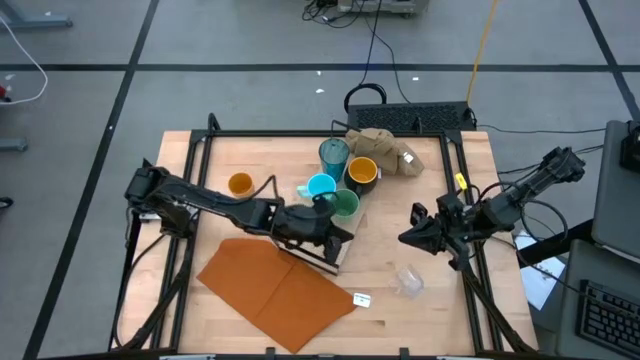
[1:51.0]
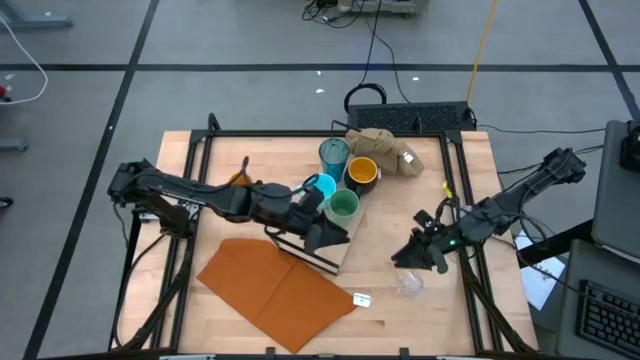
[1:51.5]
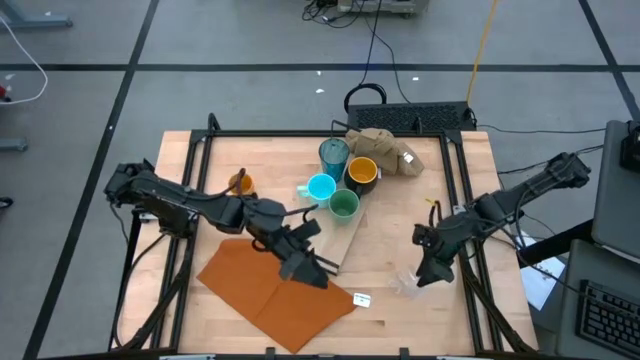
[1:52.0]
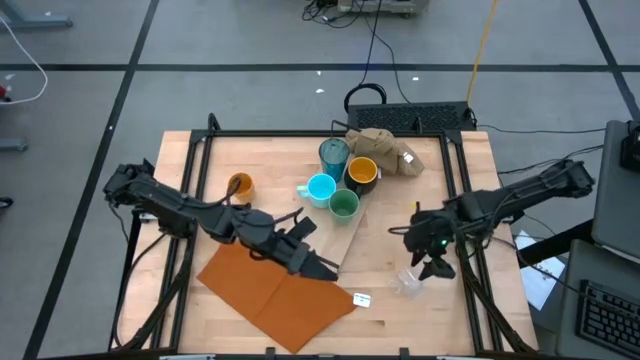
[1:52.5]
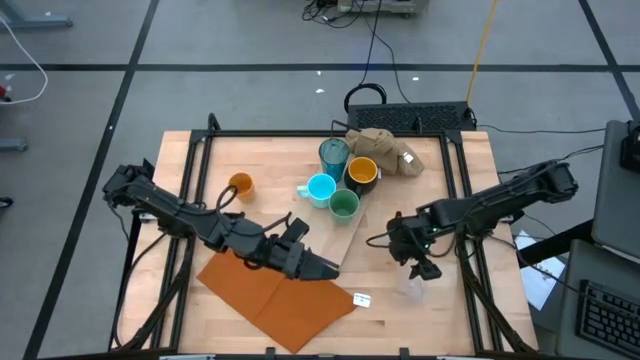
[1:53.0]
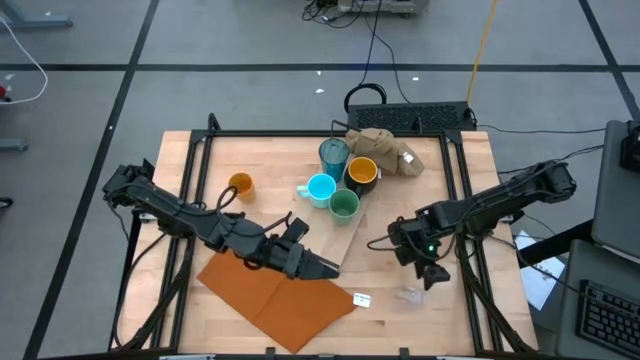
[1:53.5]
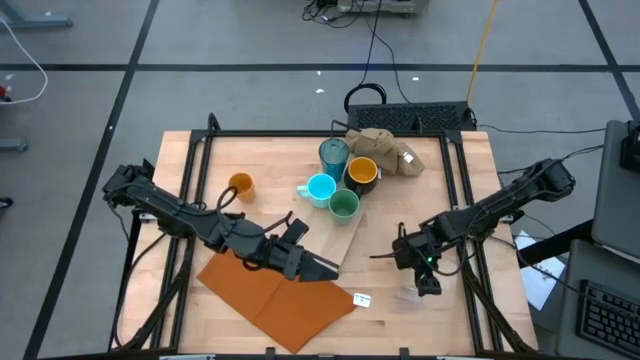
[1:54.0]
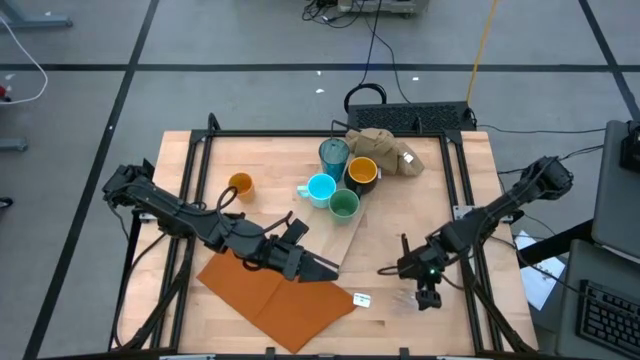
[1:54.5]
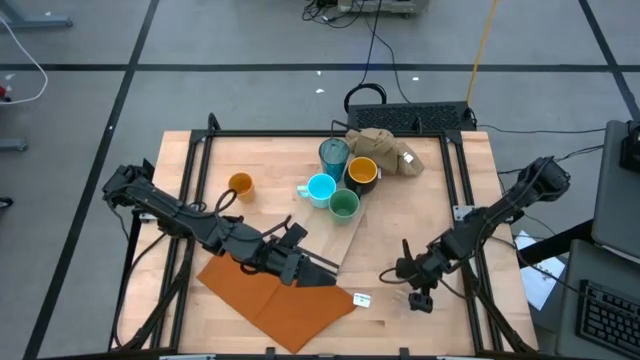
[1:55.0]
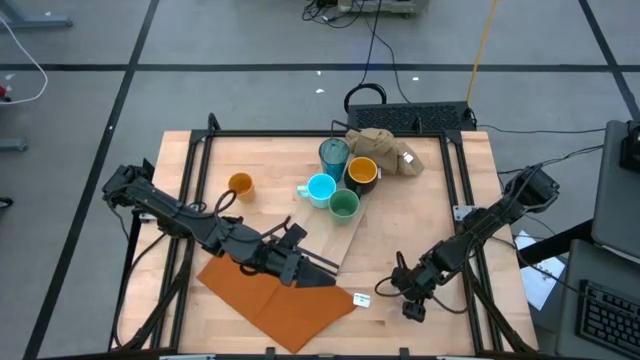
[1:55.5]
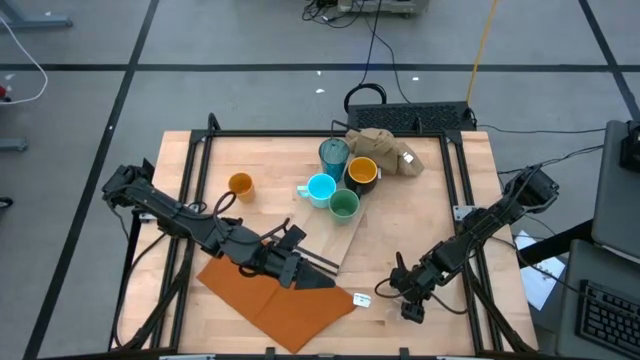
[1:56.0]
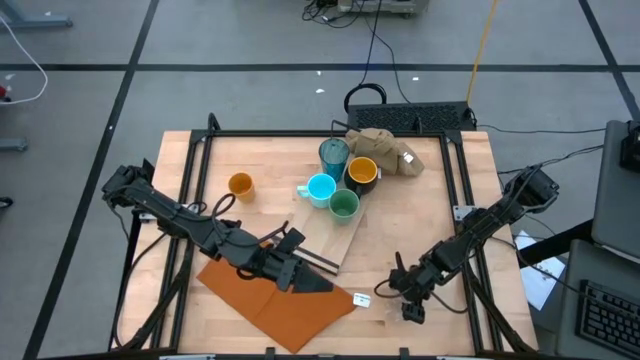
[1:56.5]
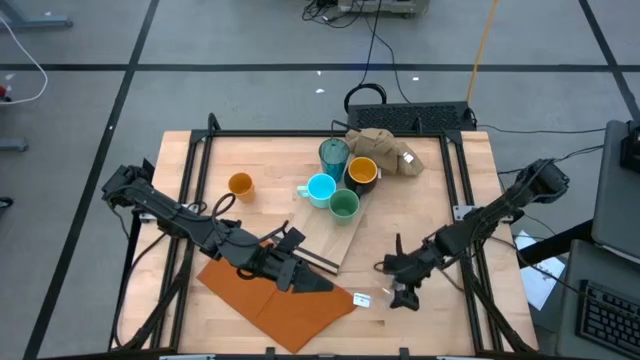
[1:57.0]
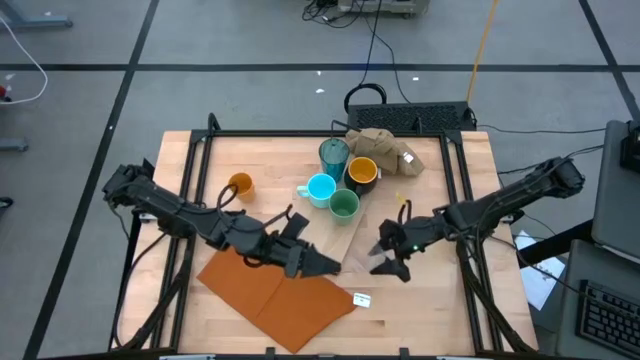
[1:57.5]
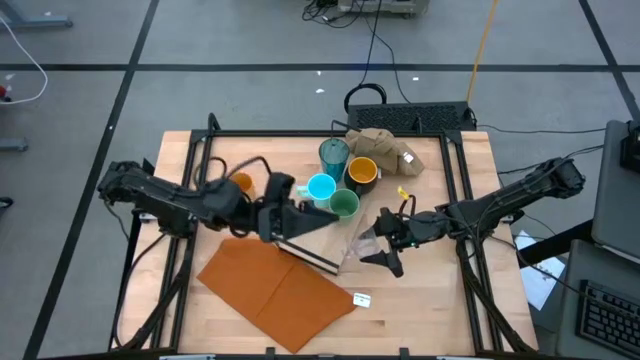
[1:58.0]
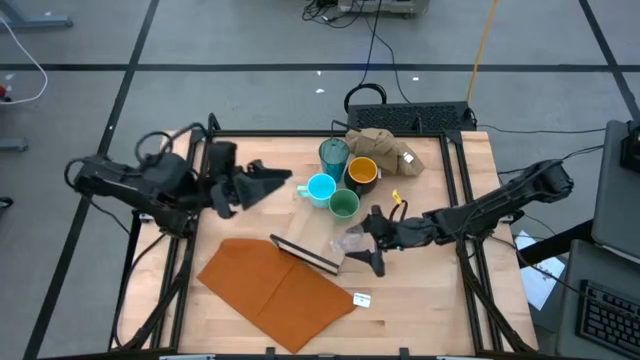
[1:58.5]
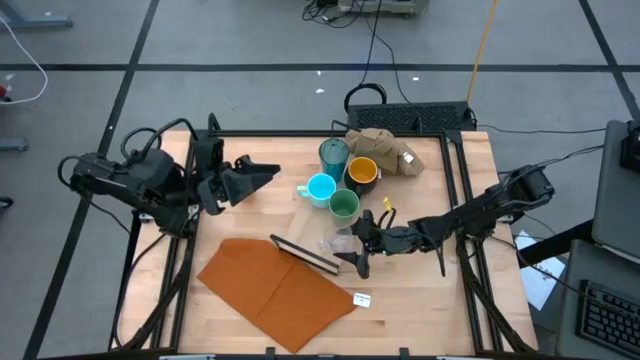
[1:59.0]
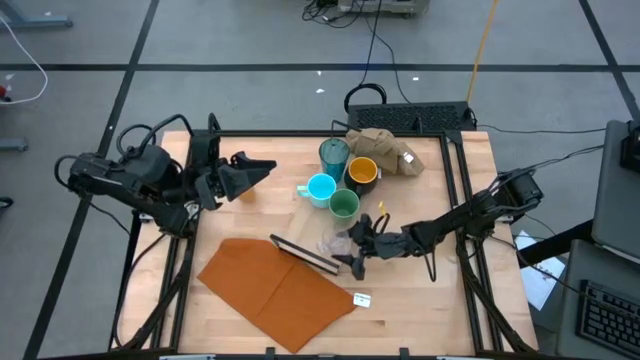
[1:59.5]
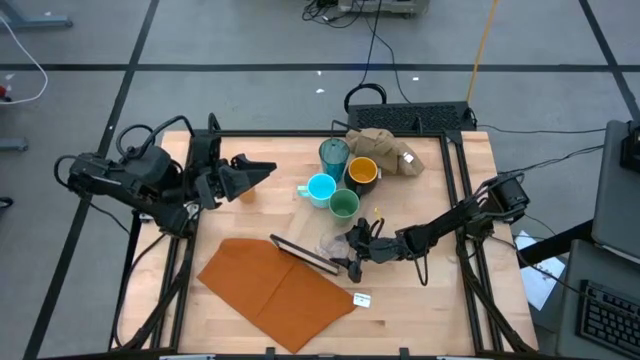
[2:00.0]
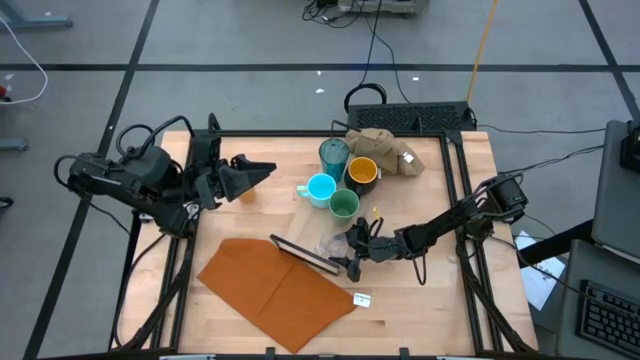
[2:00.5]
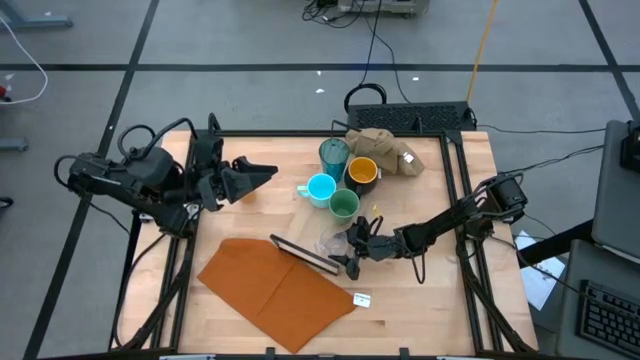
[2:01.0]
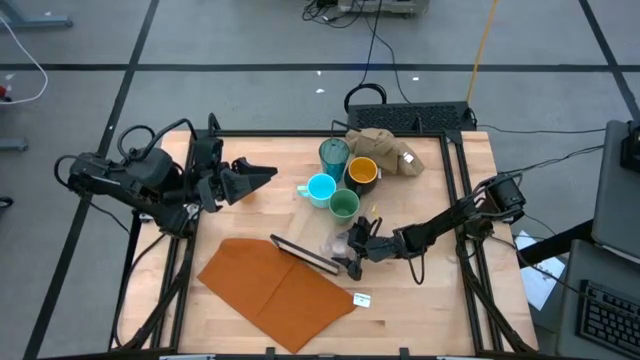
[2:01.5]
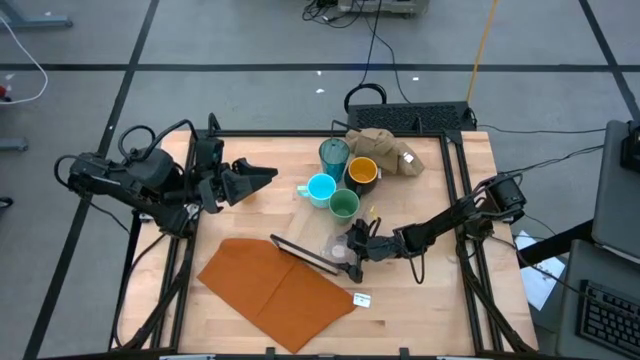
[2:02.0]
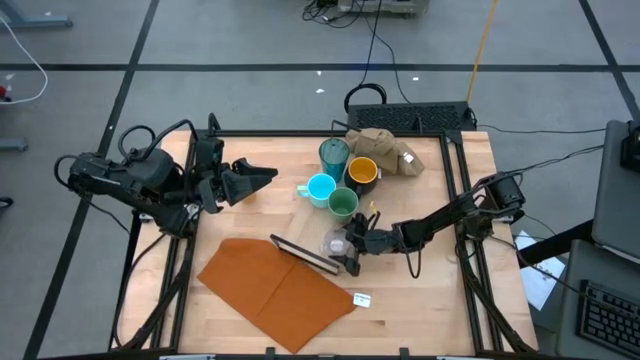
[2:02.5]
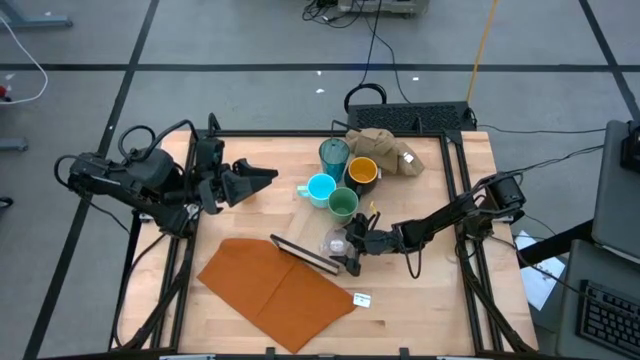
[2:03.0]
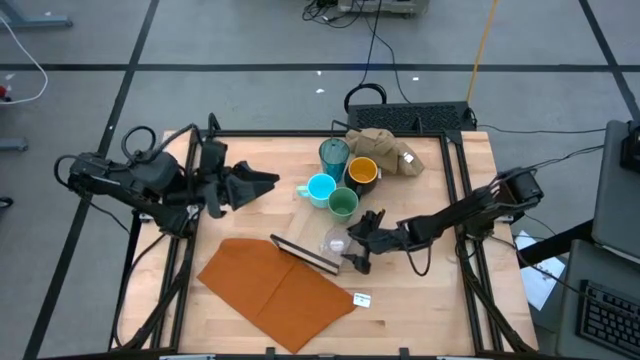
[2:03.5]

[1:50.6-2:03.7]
Task: Stack small to large cups/mugs on shelf
Put the transparent mug on the shelf

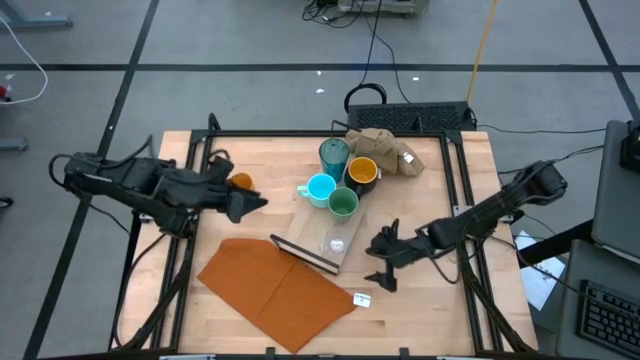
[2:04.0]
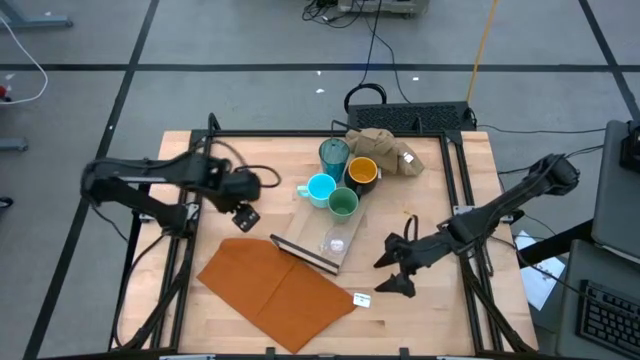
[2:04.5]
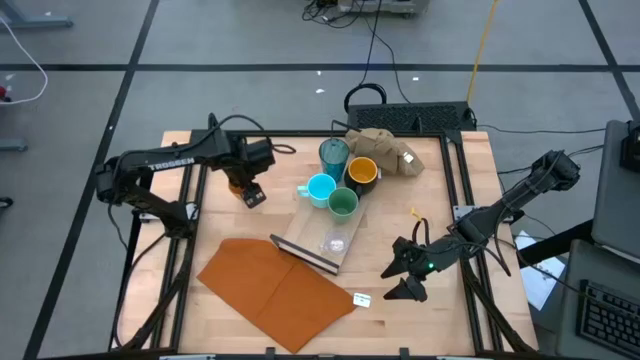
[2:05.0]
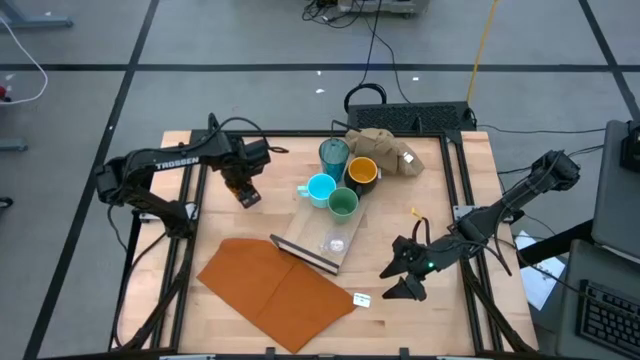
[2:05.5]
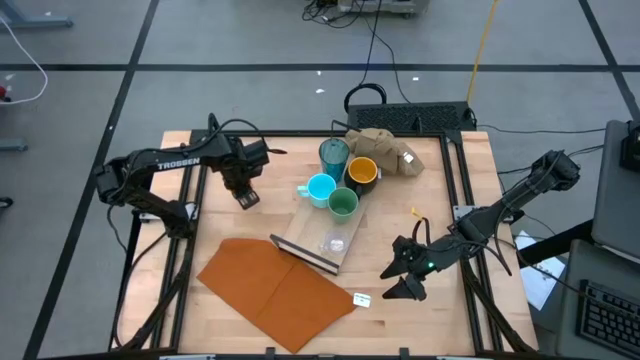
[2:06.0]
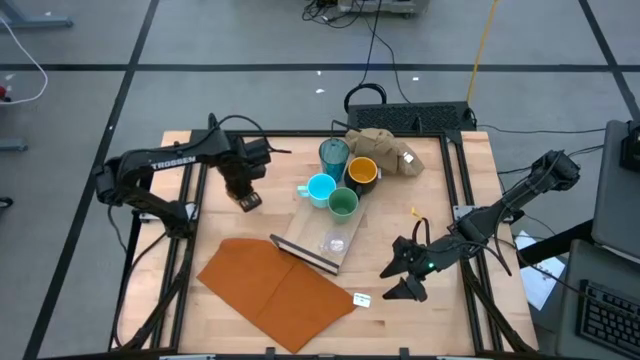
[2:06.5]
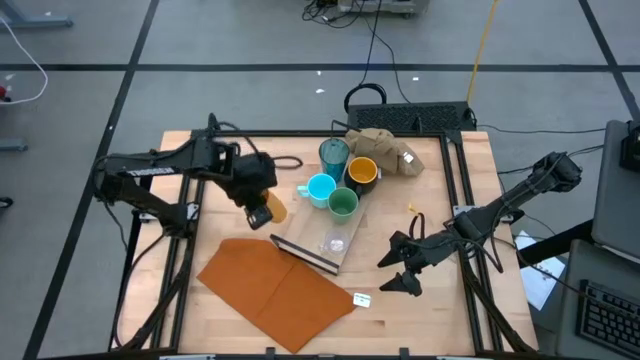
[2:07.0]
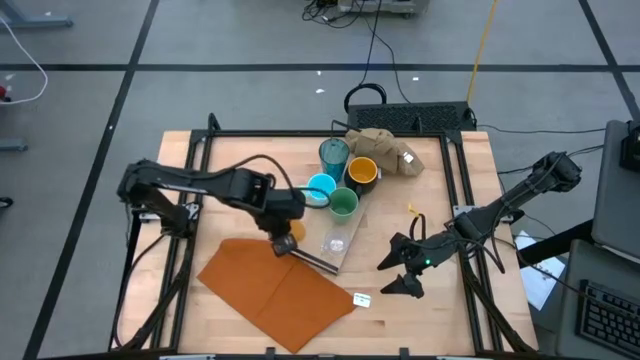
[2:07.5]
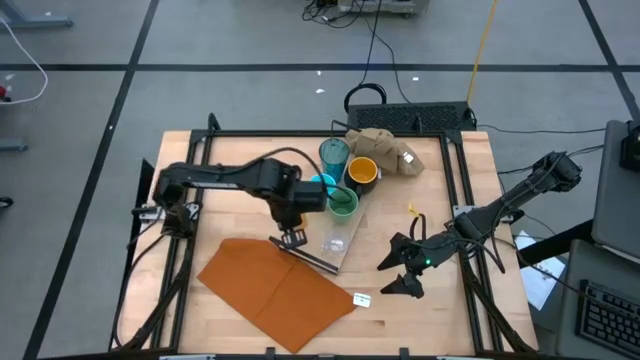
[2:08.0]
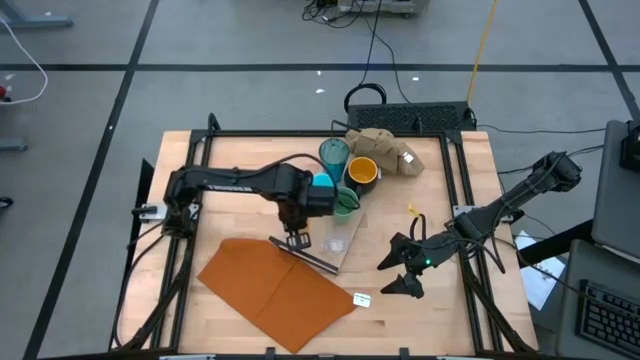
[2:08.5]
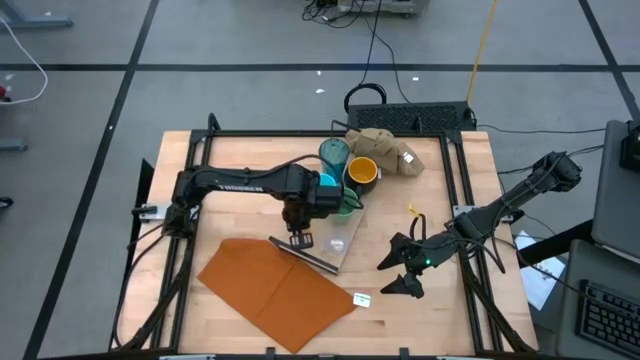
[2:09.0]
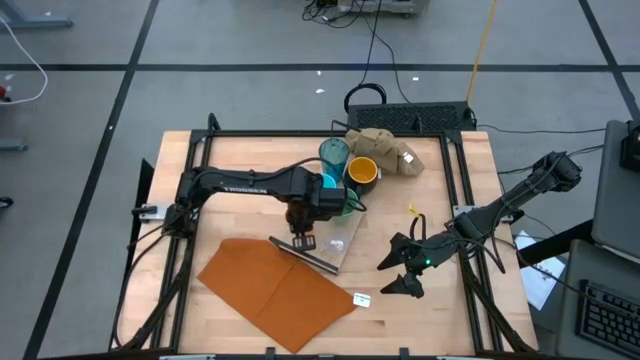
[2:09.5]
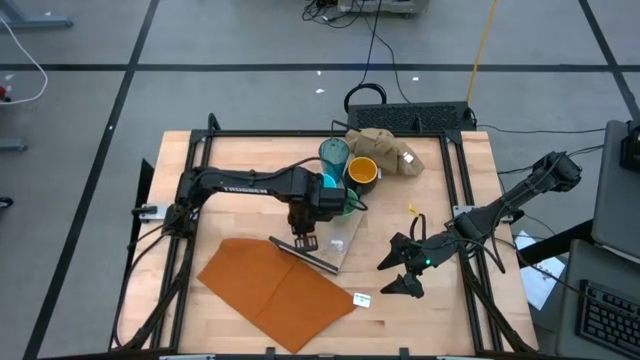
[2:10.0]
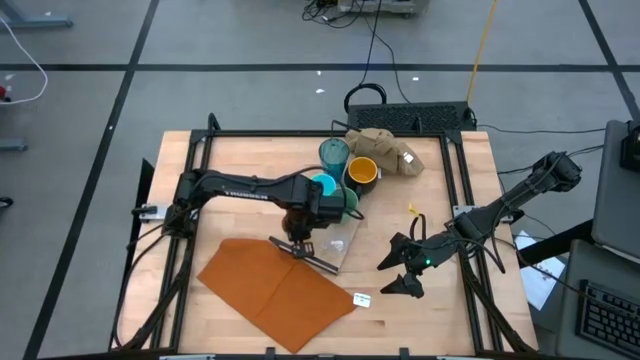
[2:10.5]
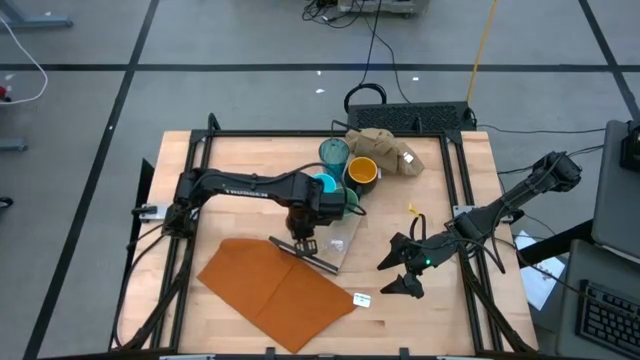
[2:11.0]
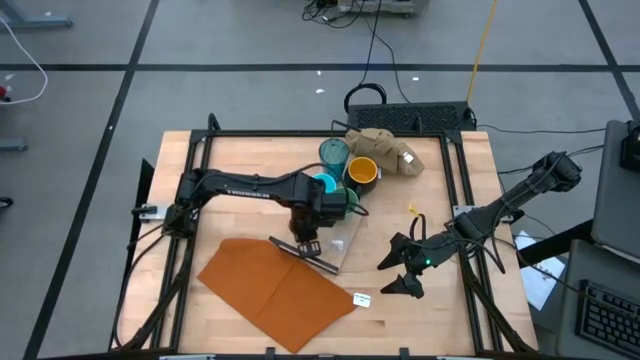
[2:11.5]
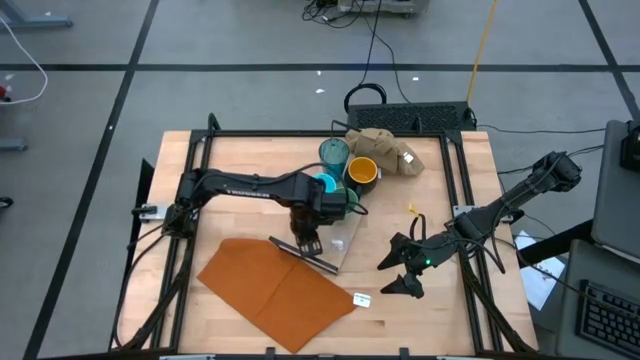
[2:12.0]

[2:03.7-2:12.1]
Put the orange cup on the shelf
